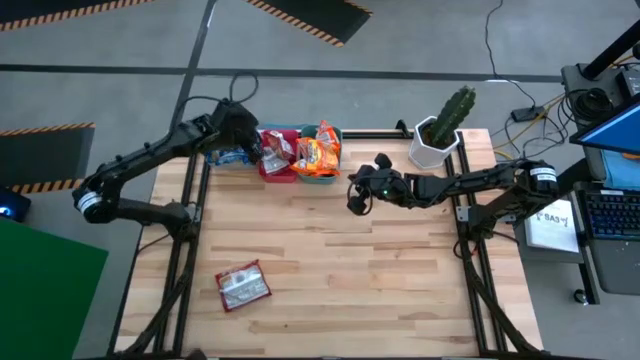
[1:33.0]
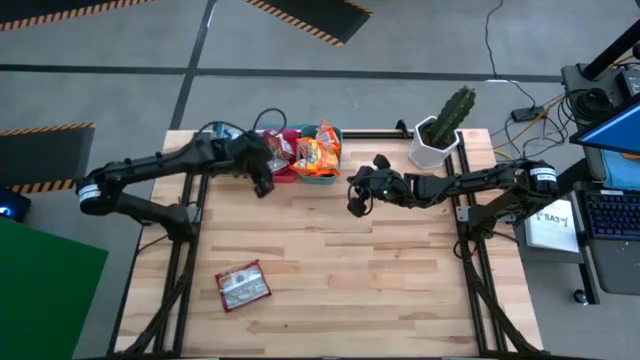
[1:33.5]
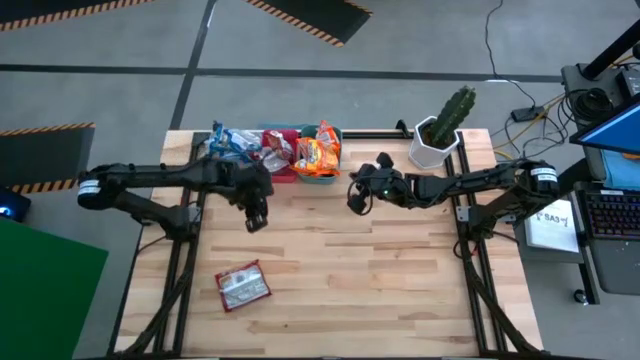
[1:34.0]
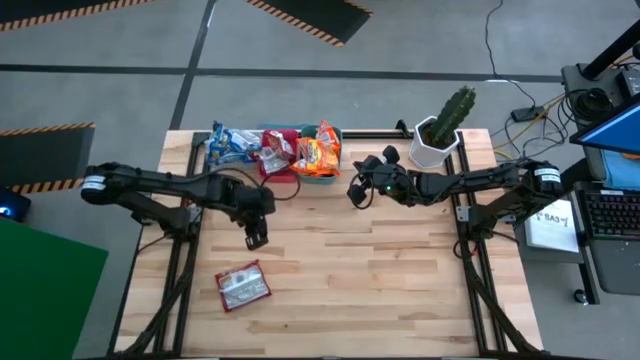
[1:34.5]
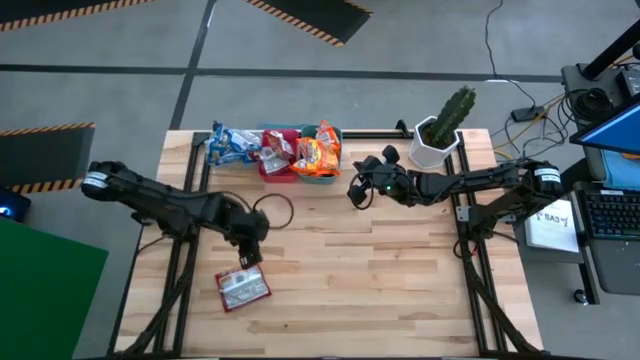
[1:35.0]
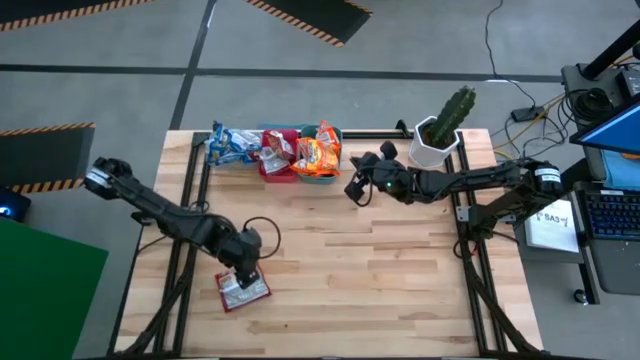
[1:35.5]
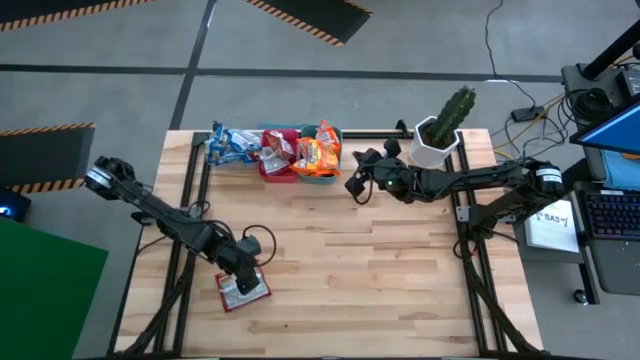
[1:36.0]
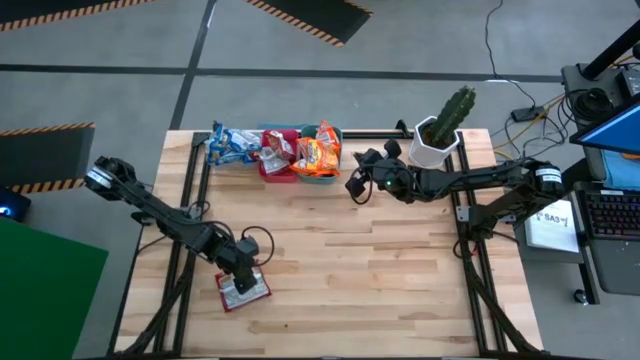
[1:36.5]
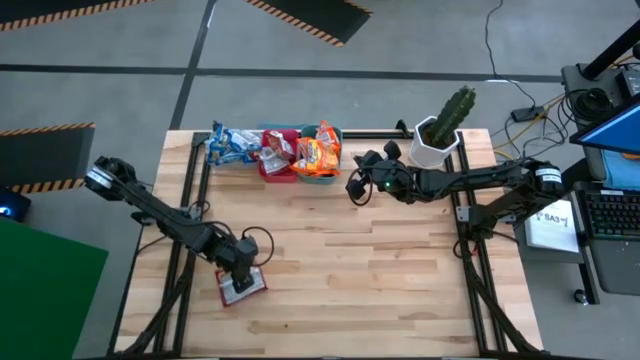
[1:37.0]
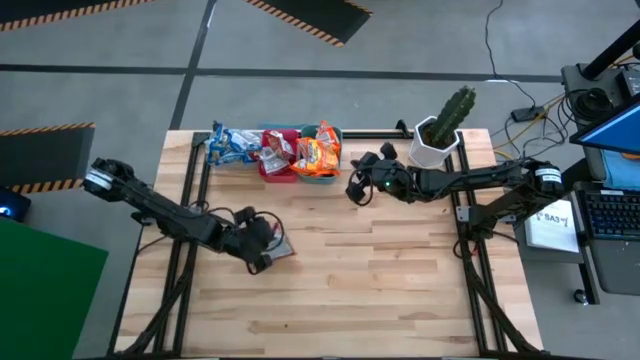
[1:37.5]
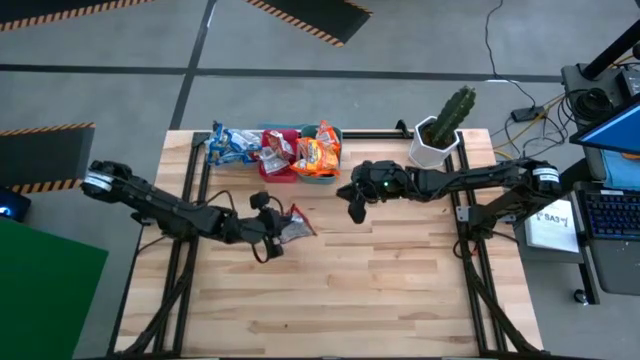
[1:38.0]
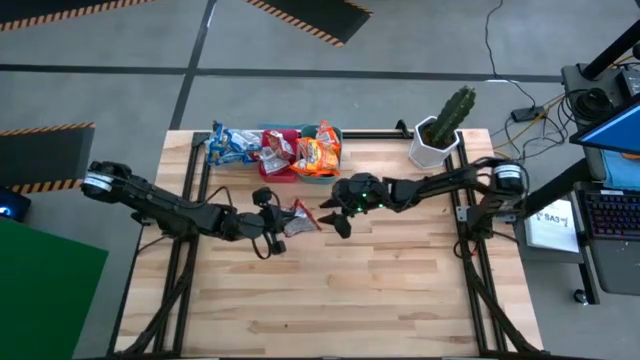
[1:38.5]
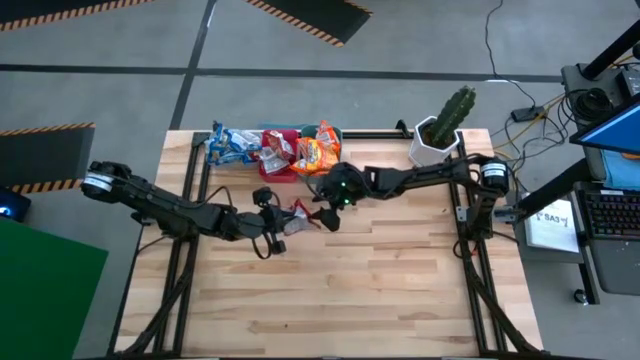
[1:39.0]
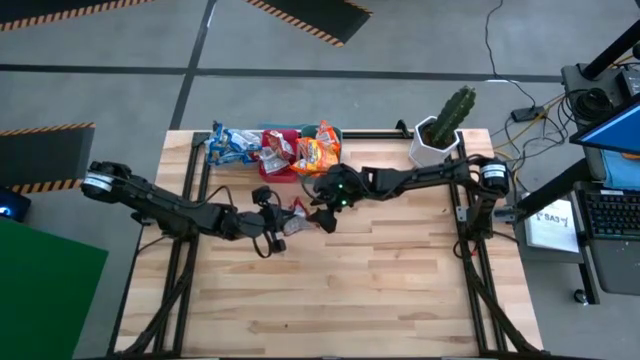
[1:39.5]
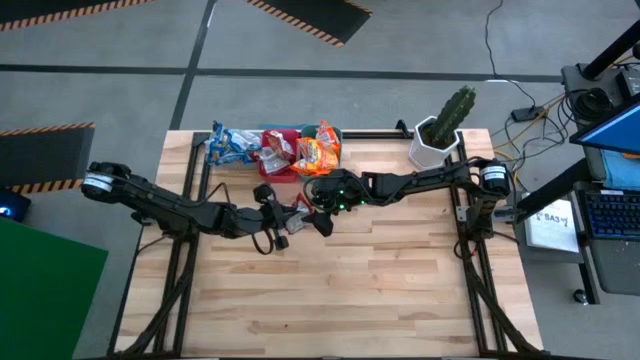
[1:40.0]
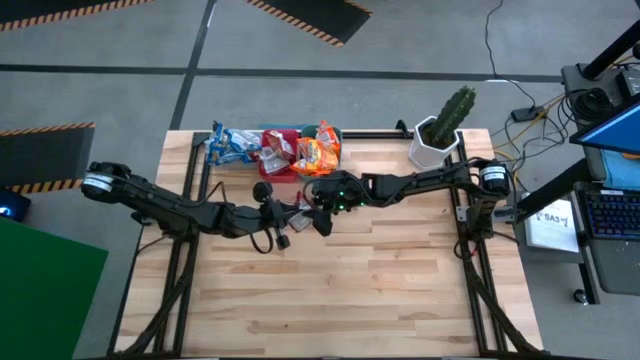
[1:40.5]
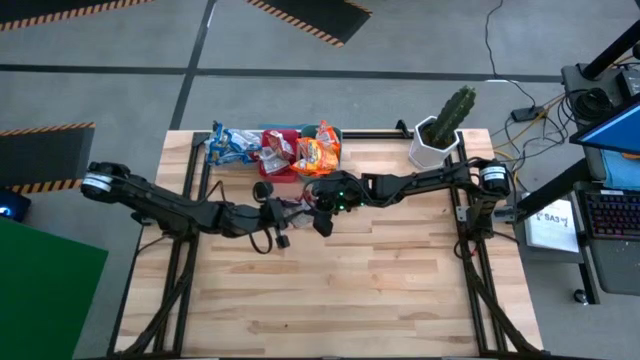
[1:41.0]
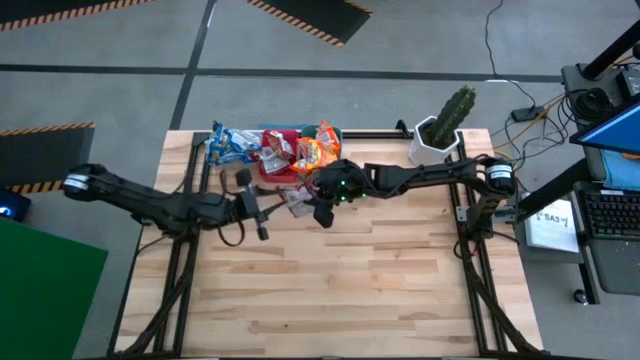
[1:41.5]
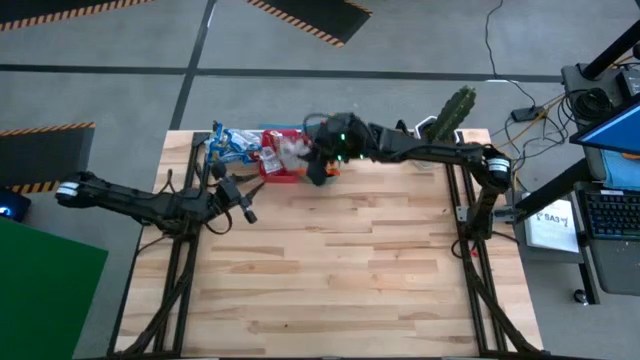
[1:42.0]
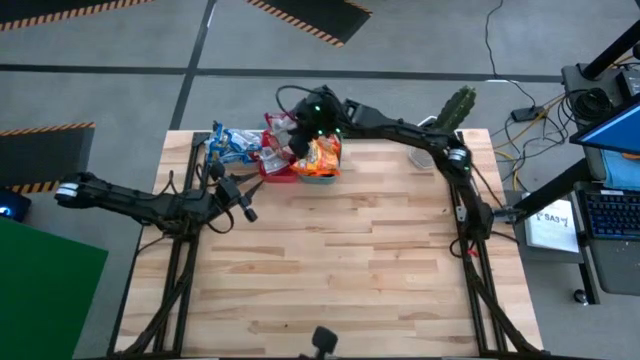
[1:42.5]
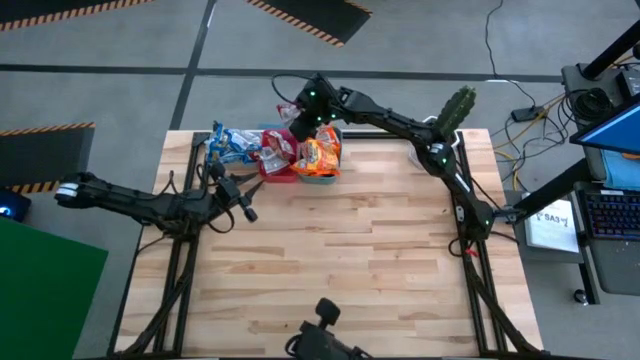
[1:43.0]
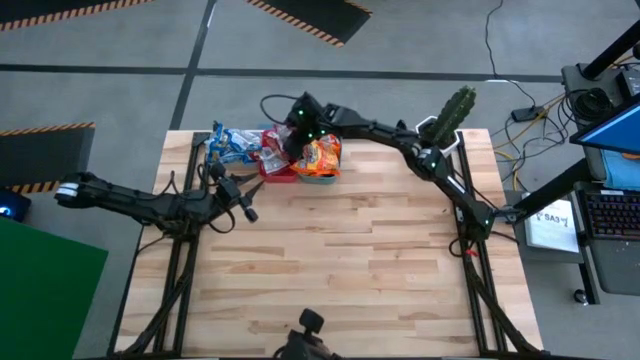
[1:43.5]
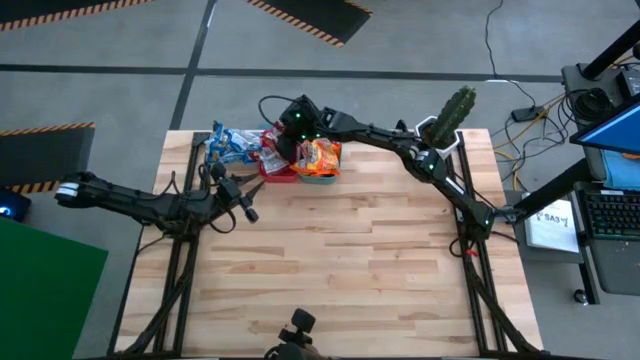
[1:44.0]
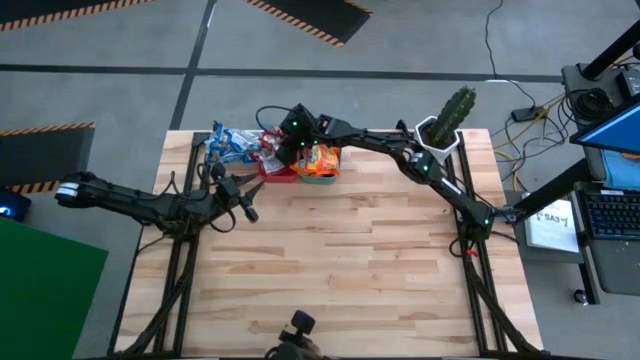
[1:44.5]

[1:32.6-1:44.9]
Task: Sort Maruchan noodles
Put the red noodle pack into the red bin

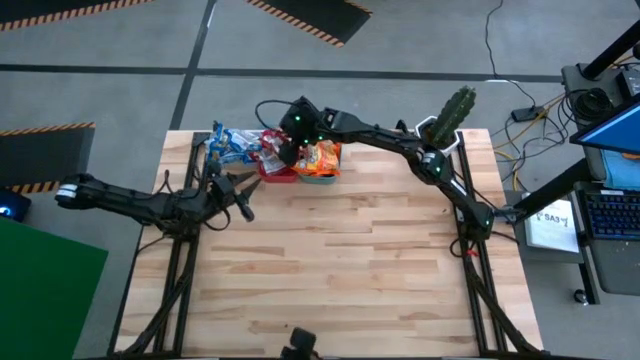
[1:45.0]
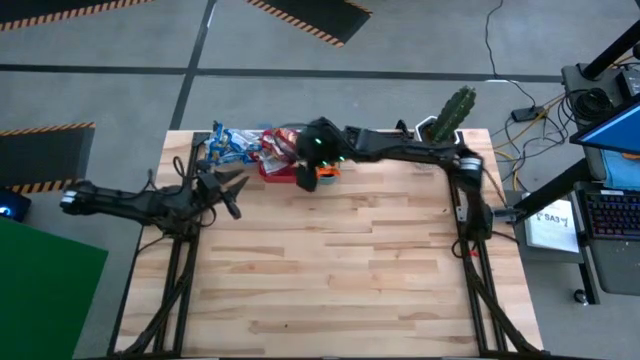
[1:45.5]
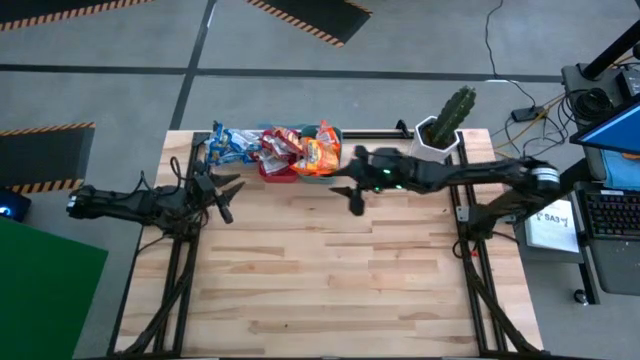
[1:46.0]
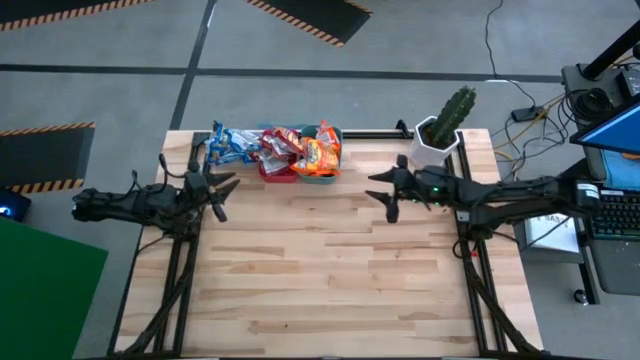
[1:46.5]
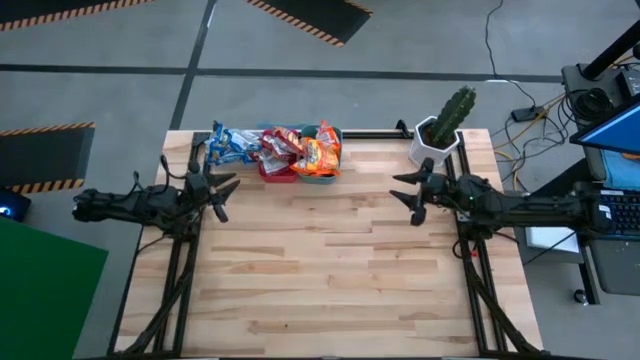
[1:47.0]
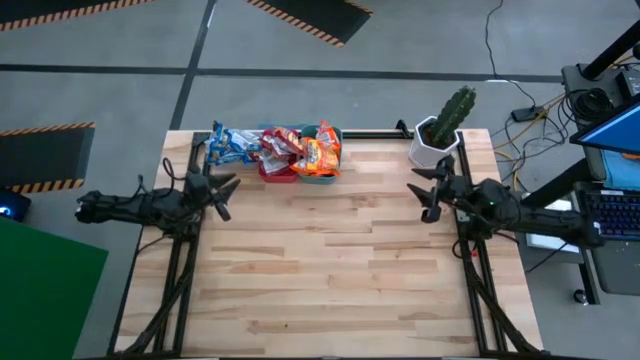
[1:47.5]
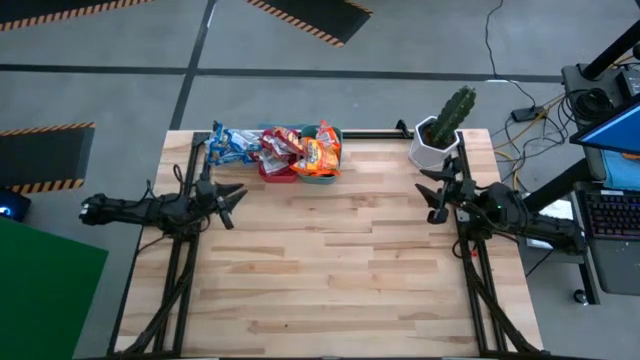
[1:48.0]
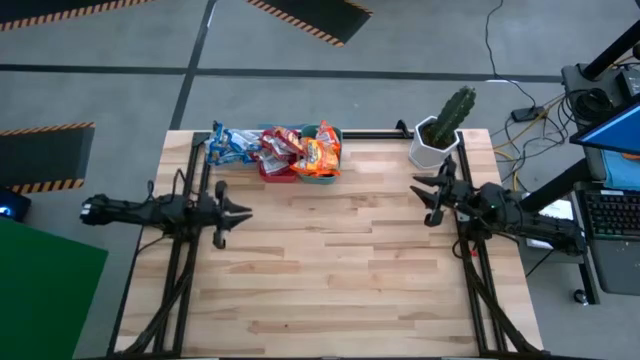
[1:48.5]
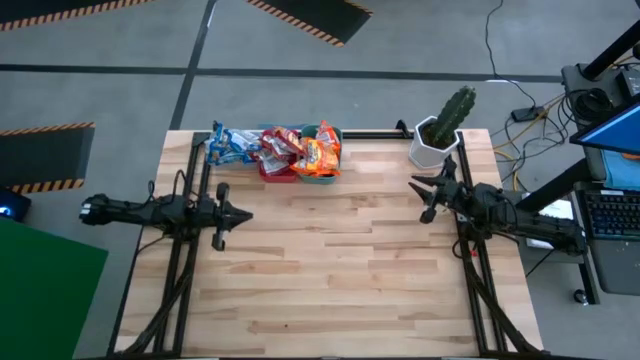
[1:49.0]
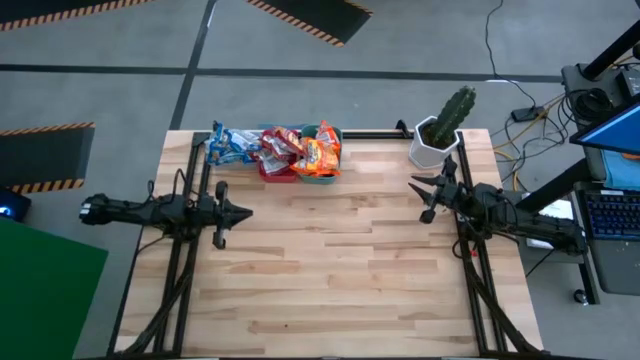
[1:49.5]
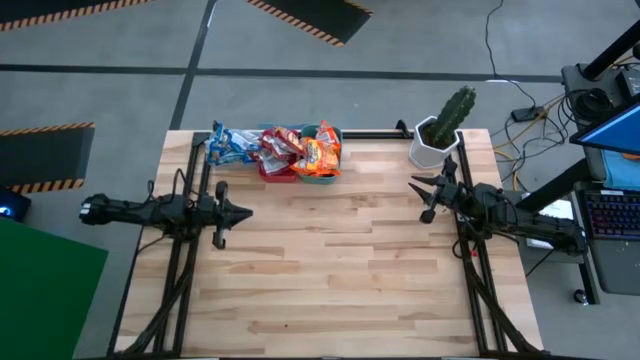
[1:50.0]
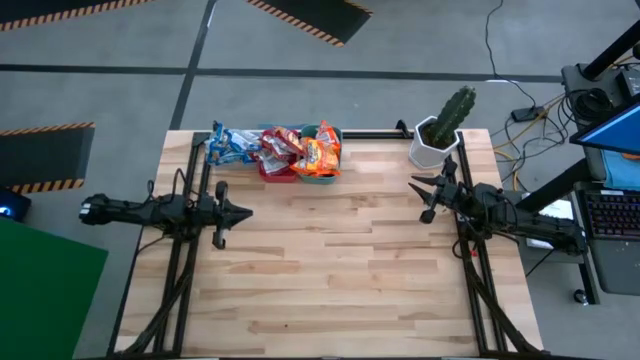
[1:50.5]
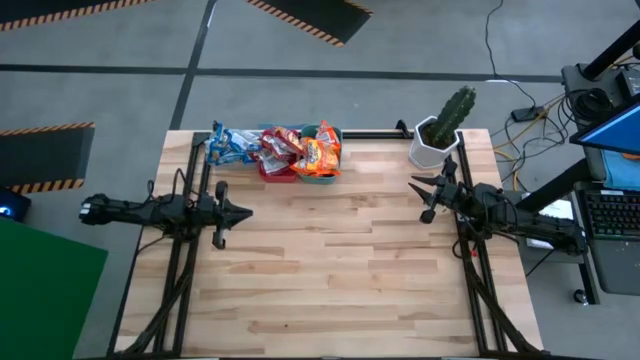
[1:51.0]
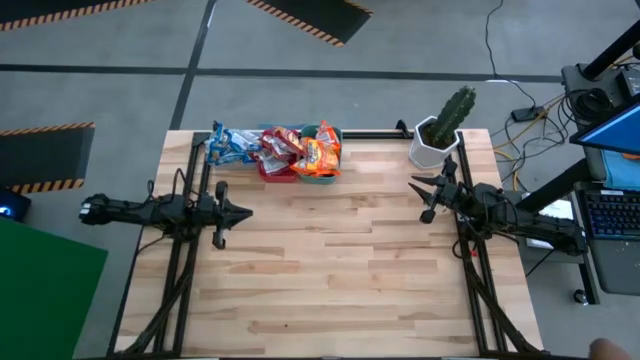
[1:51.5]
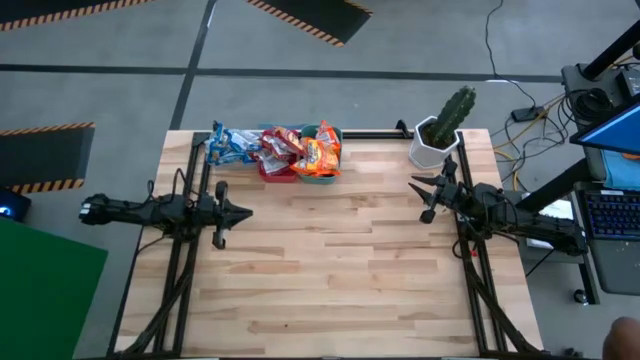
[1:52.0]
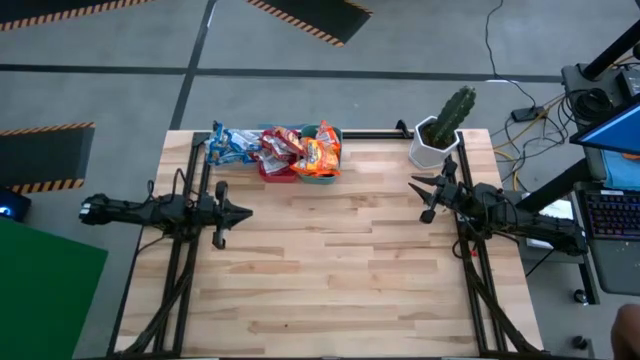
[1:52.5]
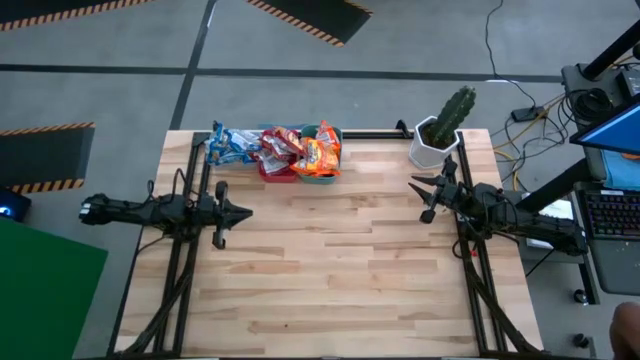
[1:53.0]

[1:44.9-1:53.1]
Return to Home Position
